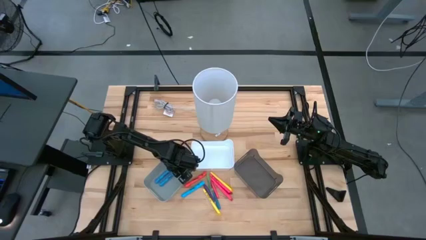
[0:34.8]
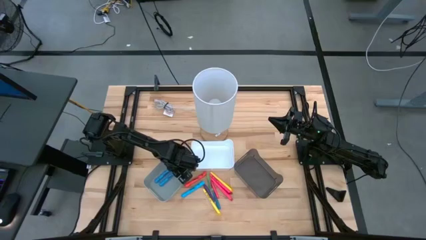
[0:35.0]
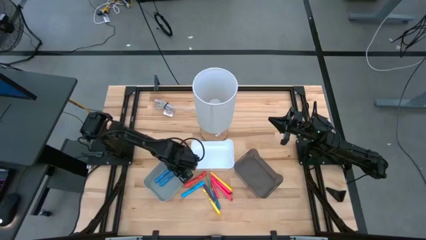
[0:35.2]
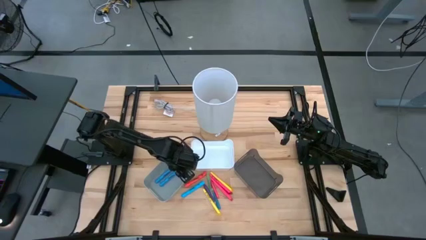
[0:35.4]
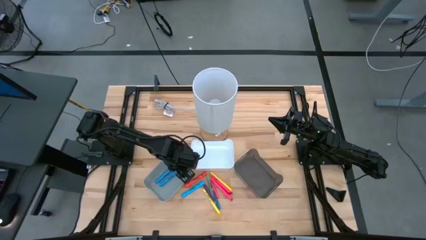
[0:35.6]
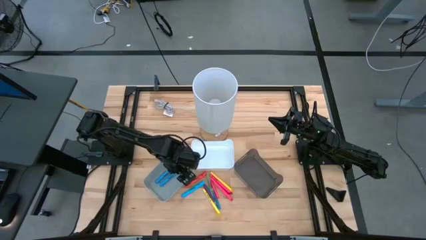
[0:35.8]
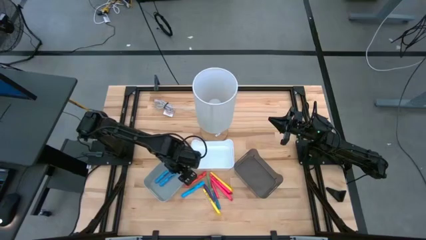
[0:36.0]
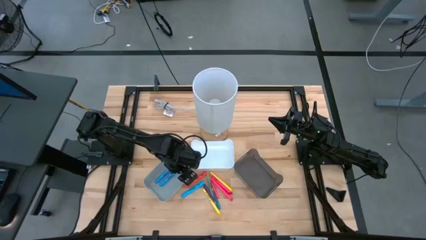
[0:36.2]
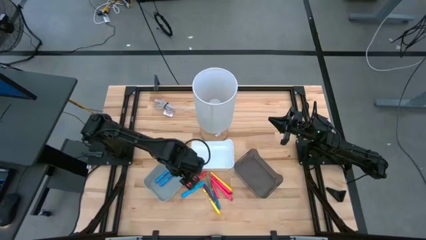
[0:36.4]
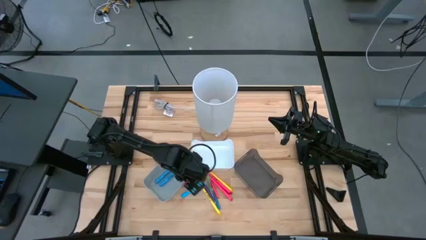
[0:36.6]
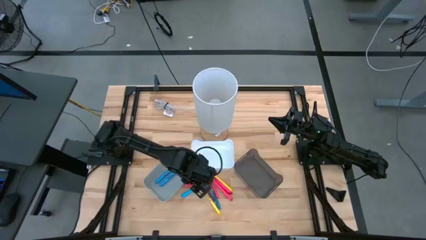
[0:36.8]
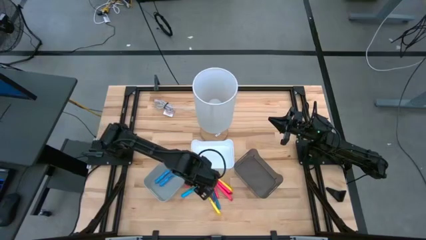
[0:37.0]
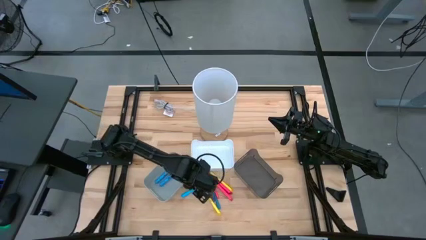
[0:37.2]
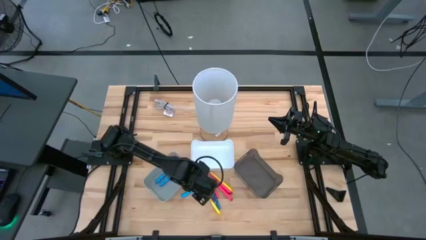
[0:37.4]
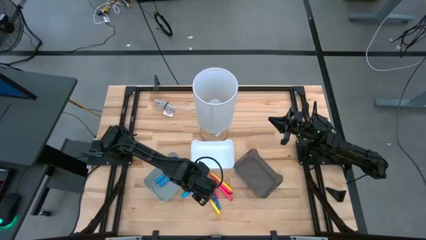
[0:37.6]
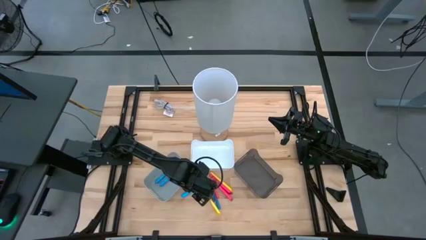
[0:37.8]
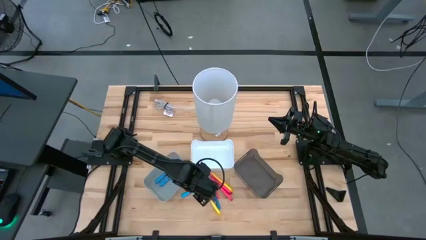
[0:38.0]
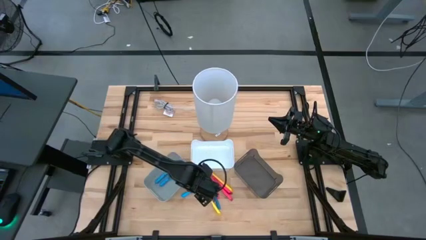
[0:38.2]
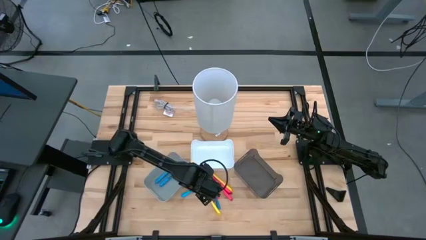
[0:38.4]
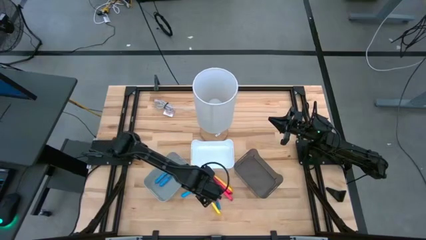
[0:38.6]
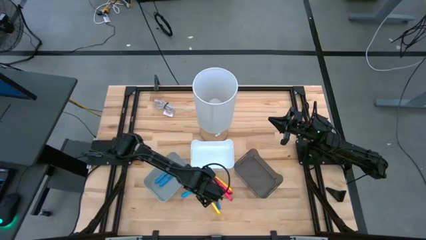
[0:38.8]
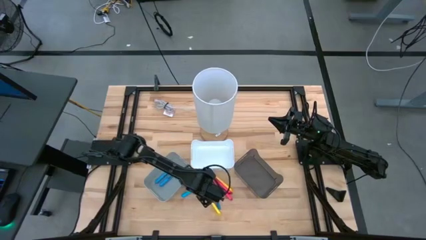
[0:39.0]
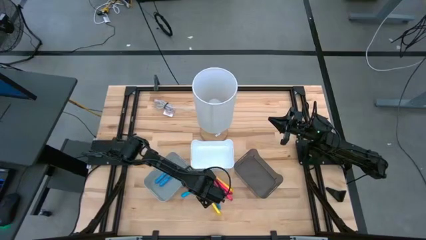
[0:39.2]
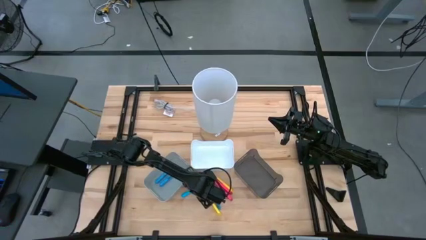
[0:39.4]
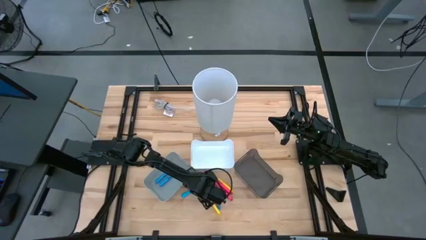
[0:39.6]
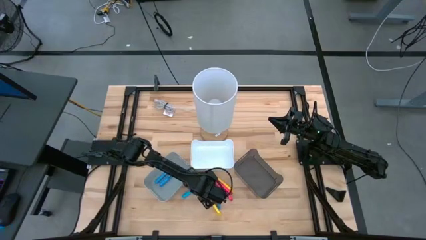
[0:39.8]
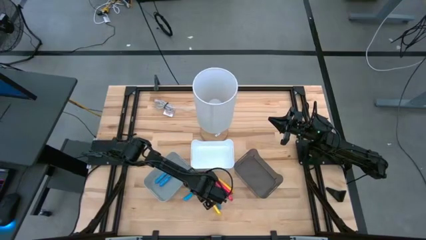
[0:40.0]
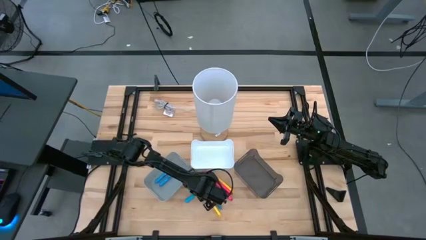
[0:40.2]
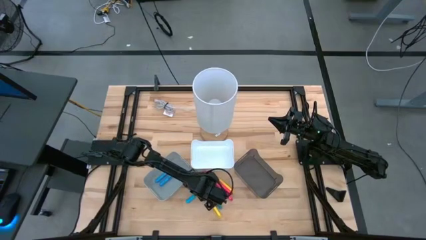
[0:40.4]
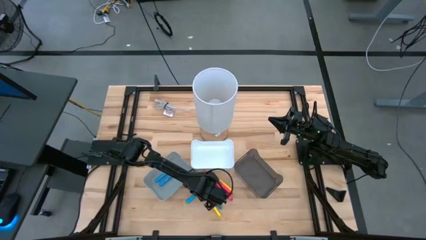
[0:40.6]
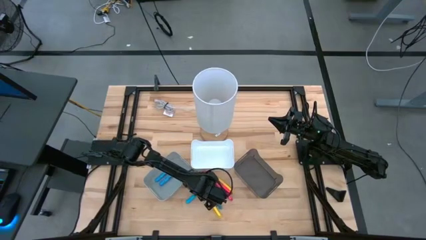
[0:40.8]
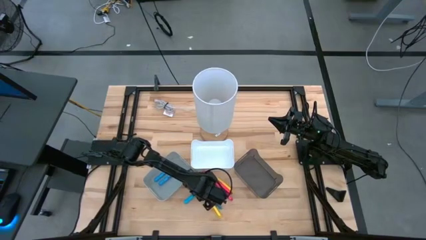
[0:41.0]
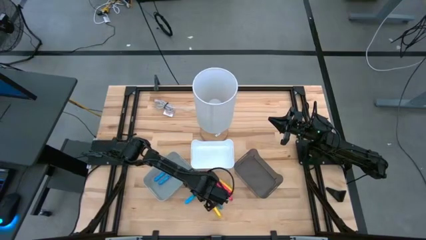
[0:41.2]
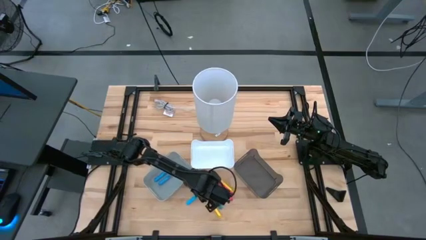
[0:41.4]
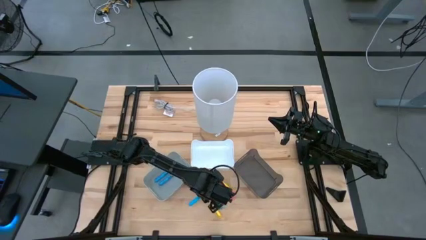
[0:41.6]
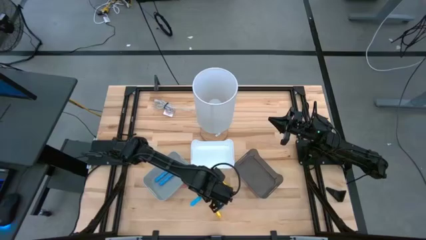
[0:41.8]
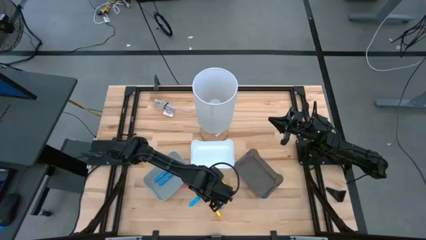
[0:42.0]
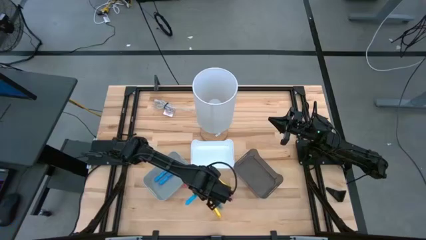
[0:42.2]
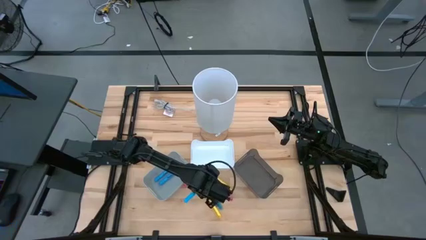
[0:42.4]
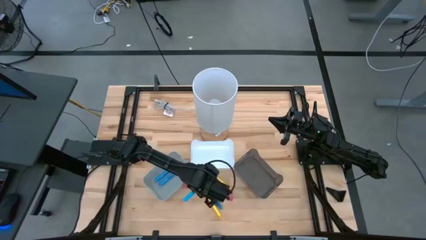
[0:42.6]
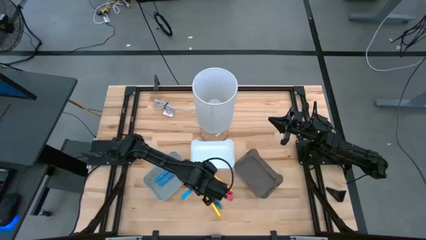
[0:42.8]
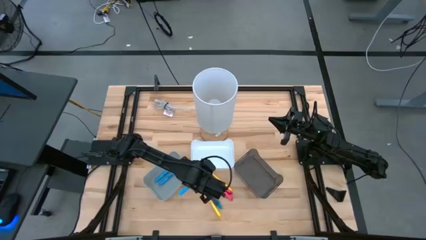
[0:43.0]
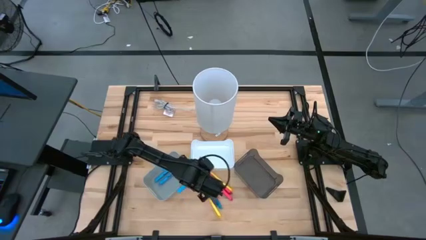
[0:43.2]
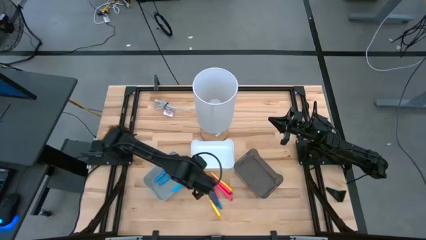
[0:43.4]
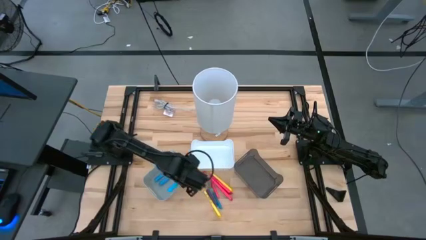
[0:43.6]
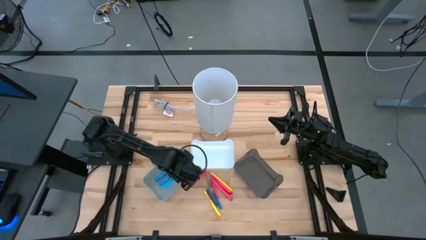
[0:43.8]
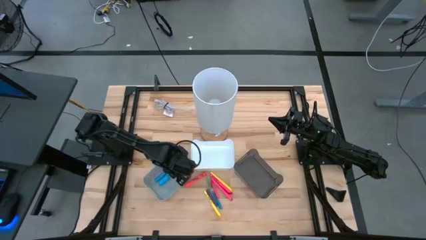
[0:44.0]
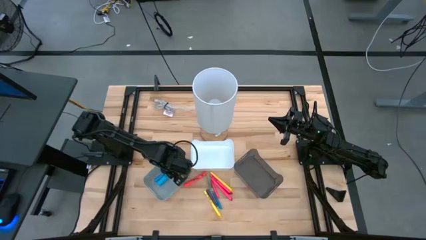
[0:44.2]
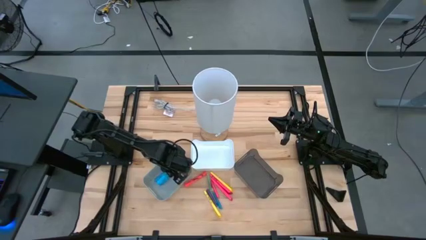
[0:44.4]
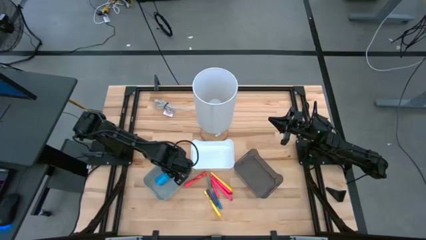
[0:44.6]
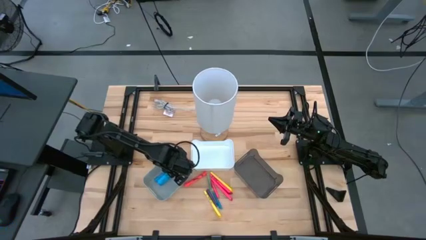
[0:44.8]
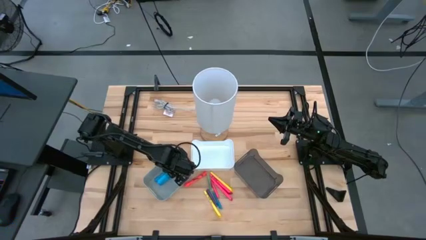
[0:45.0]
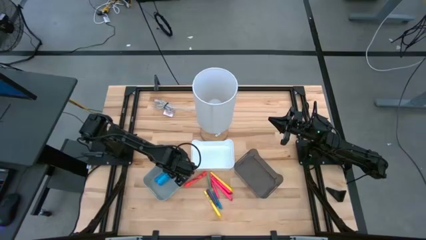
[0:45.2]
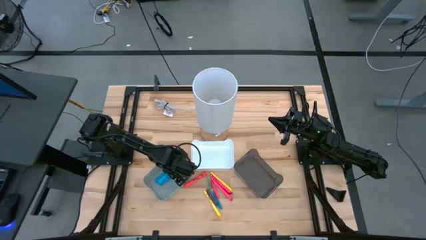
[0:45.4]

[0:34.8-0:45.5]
Task: Pick & Place Markers
Put the blue highlighter pen in the gray bin
